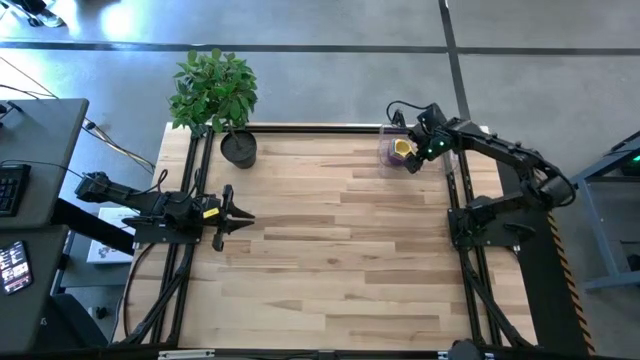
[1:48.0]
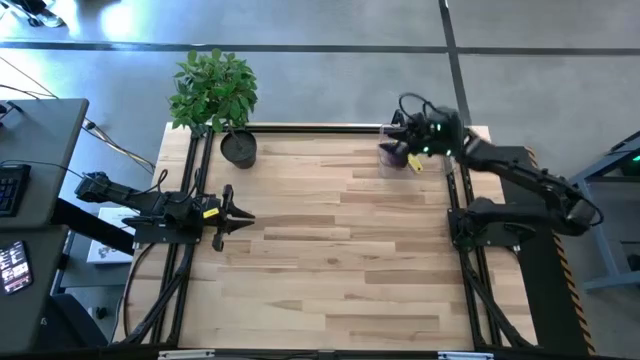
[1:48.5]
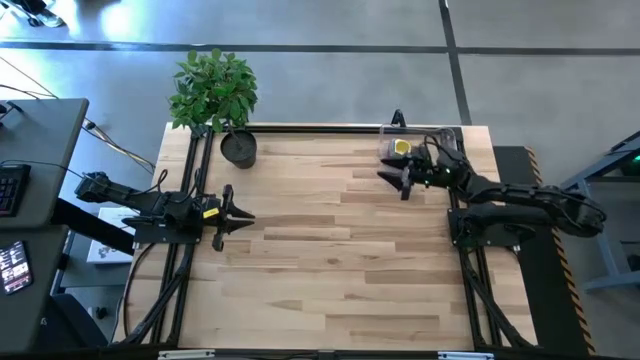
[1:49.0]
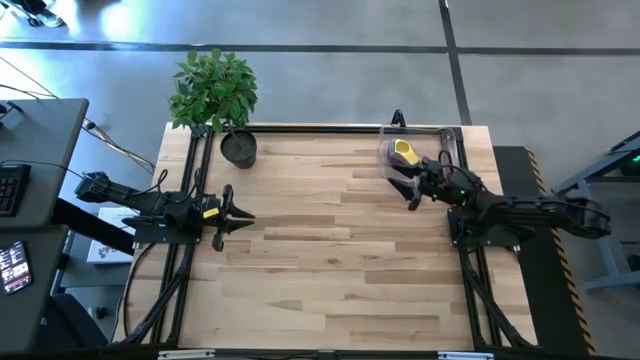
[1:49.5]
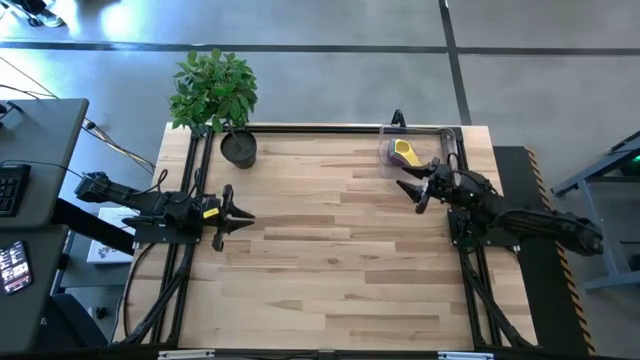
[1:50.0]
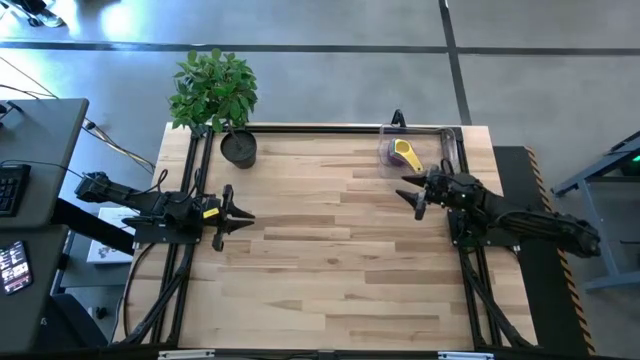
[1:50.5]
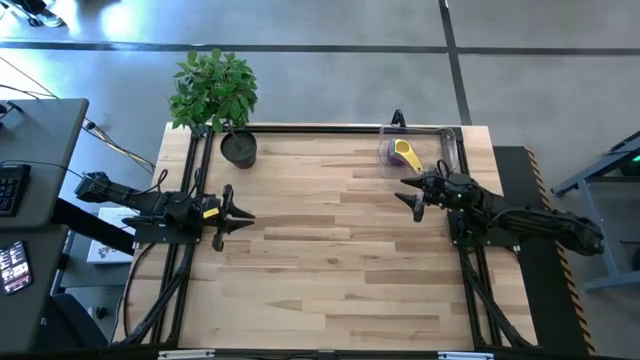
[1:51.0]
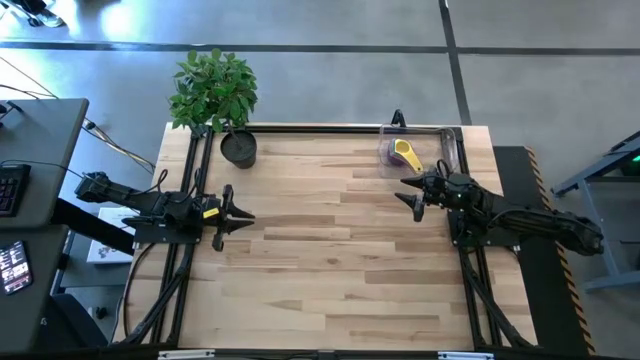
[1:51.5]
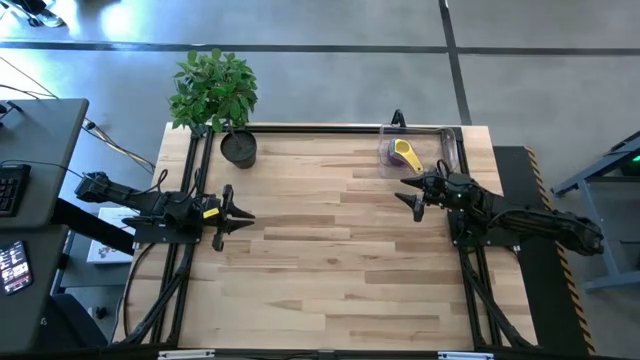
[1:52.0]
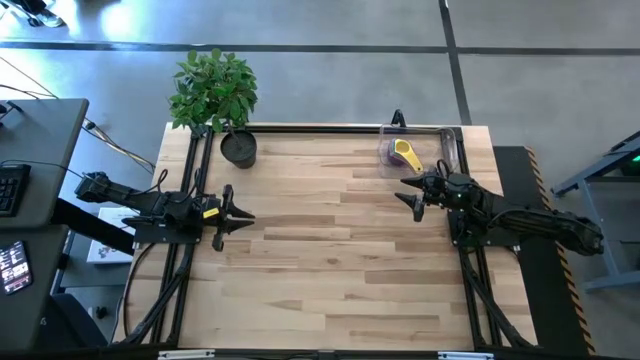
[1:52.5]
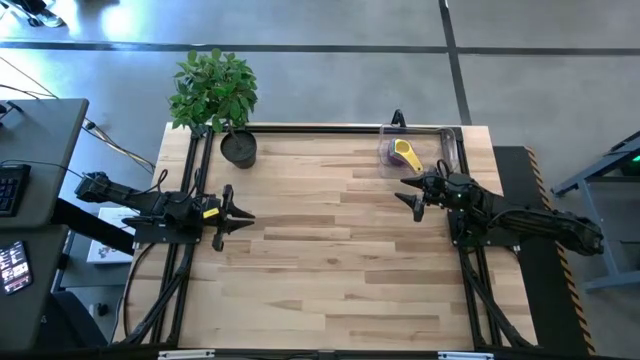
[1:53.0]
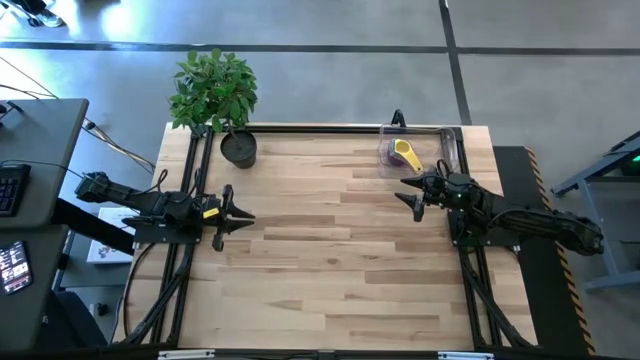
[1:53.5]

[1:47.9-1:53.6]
Task: Nest measuring cups in basket
Return to Home Position

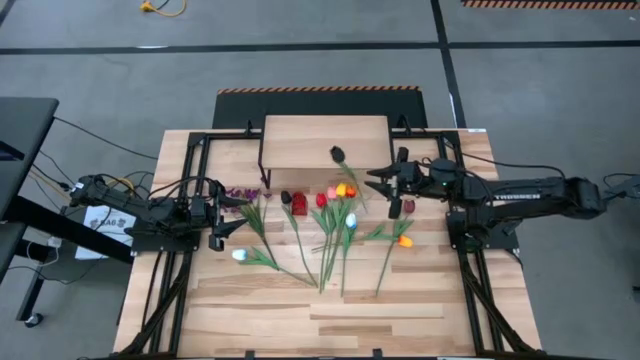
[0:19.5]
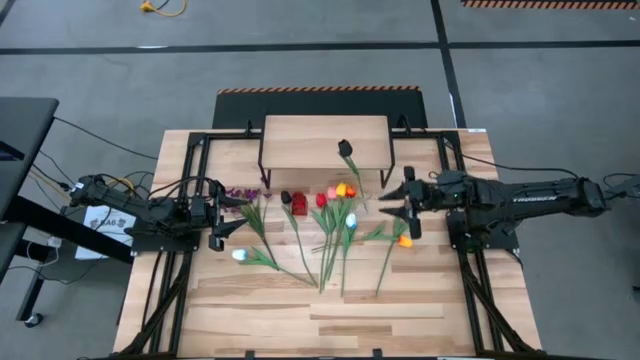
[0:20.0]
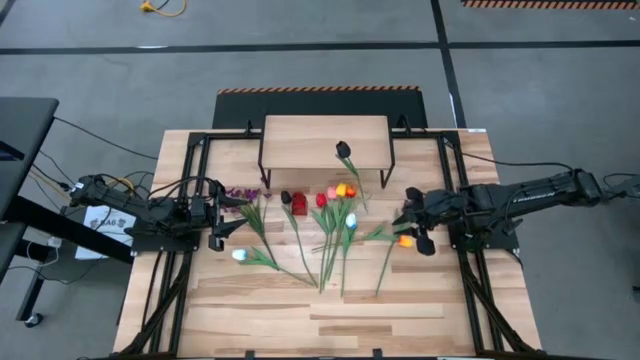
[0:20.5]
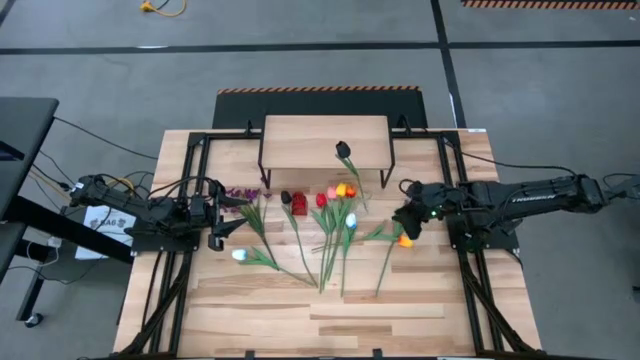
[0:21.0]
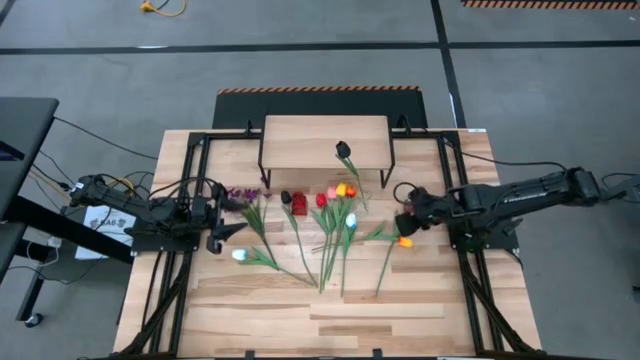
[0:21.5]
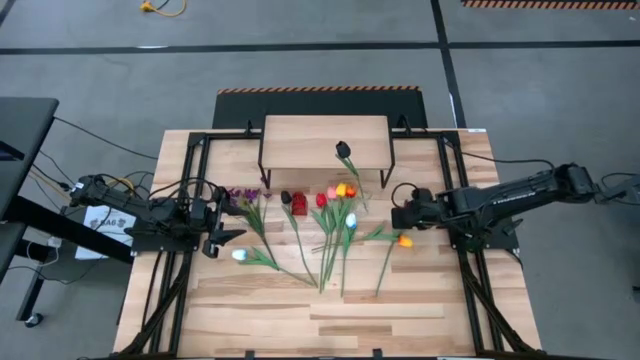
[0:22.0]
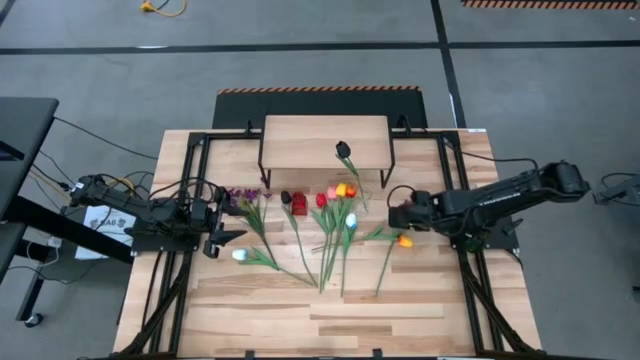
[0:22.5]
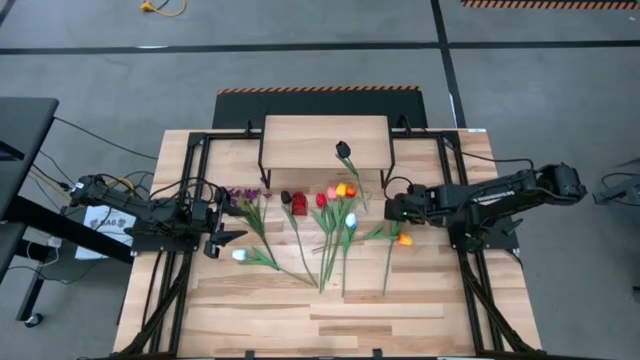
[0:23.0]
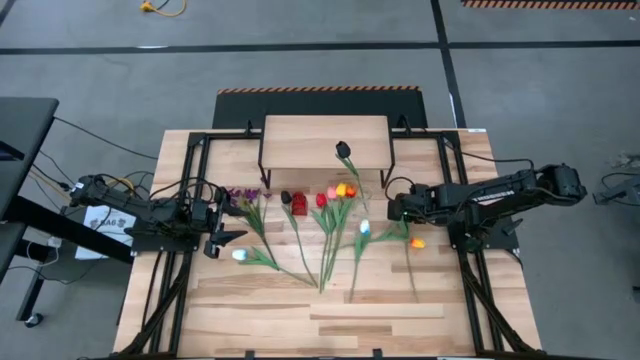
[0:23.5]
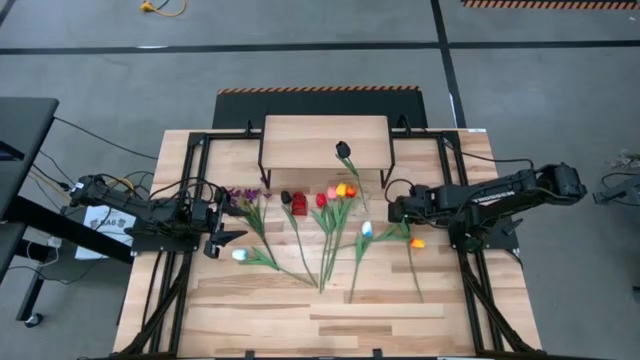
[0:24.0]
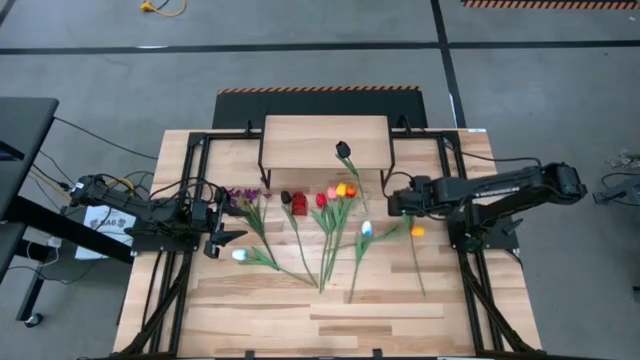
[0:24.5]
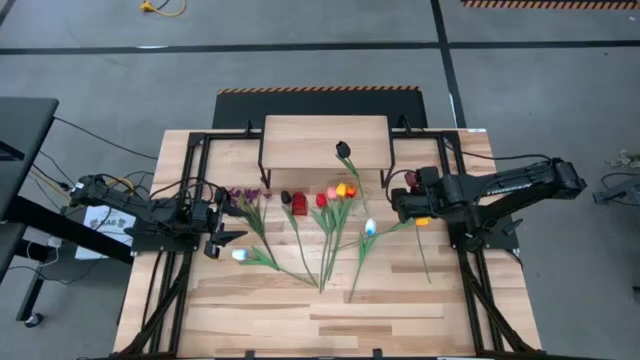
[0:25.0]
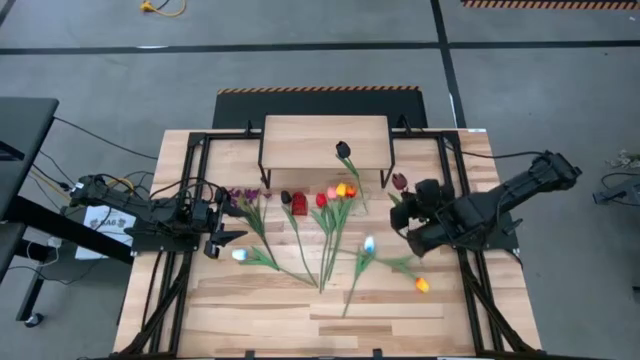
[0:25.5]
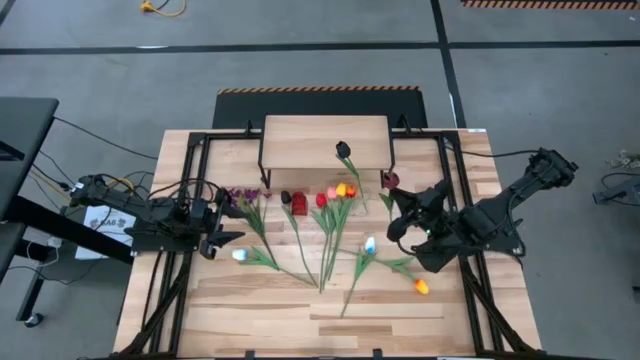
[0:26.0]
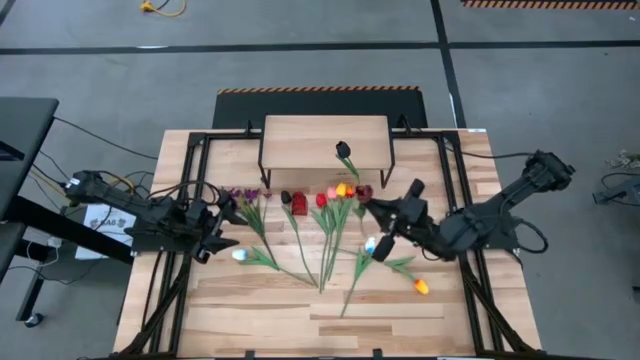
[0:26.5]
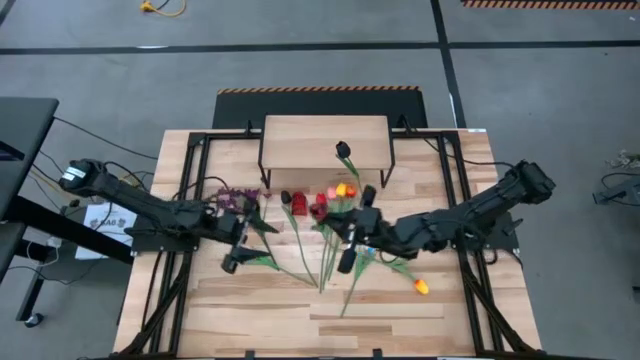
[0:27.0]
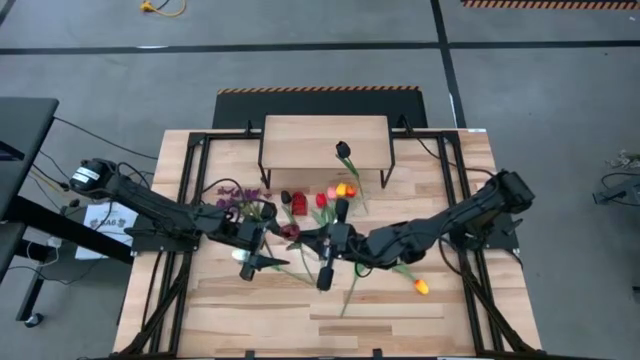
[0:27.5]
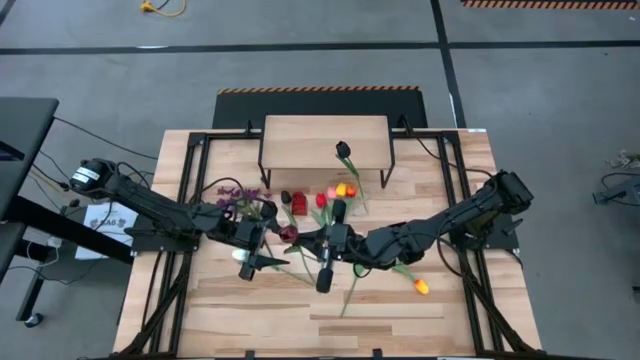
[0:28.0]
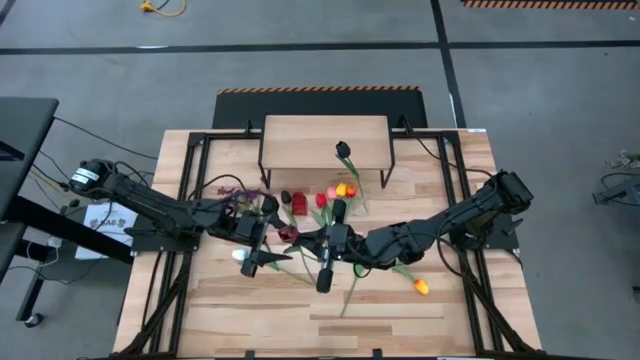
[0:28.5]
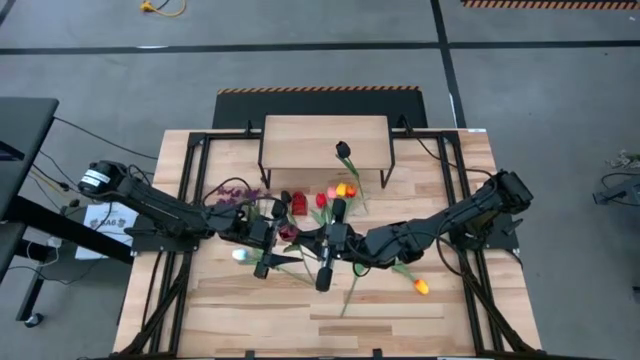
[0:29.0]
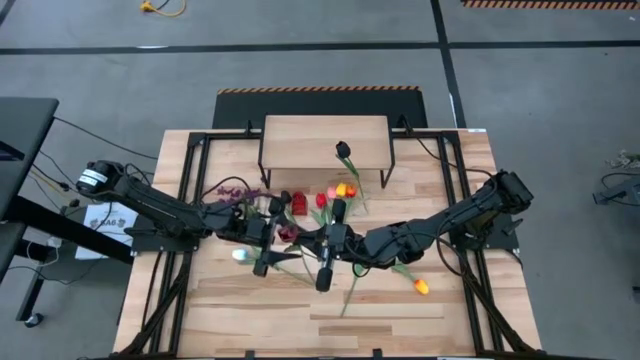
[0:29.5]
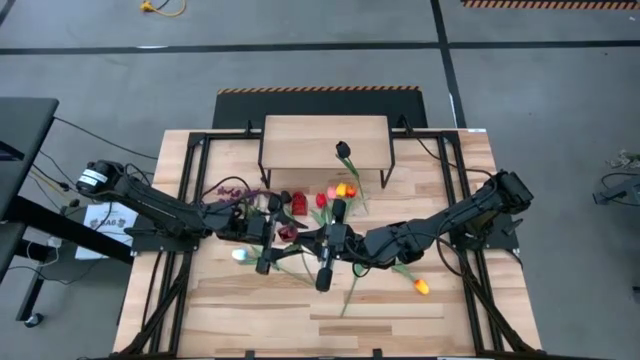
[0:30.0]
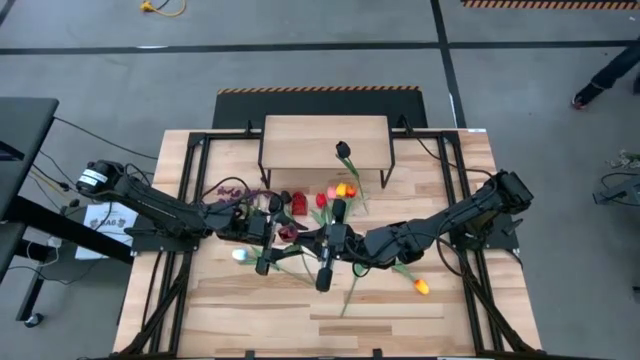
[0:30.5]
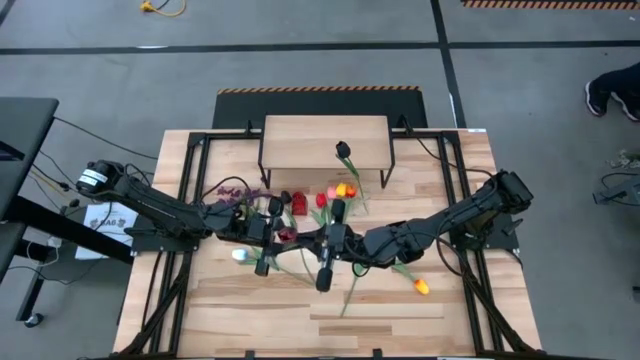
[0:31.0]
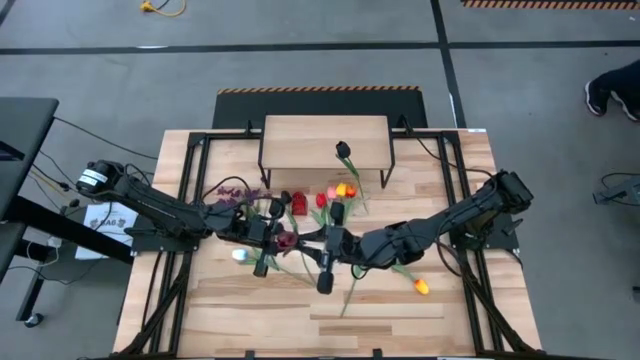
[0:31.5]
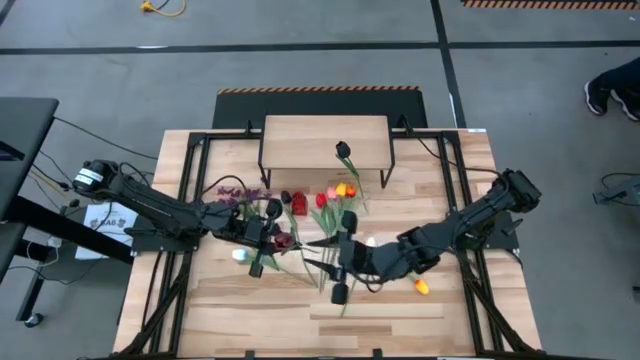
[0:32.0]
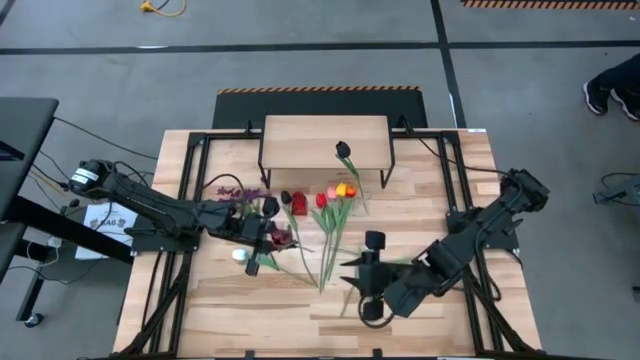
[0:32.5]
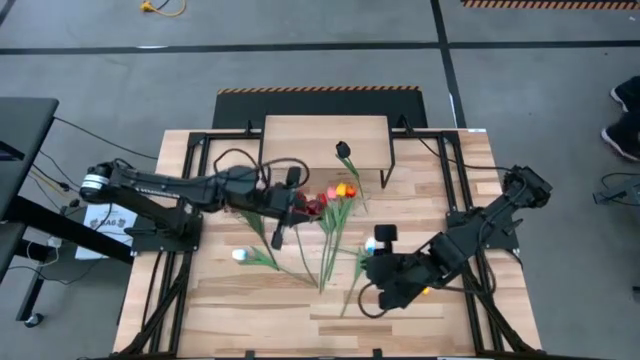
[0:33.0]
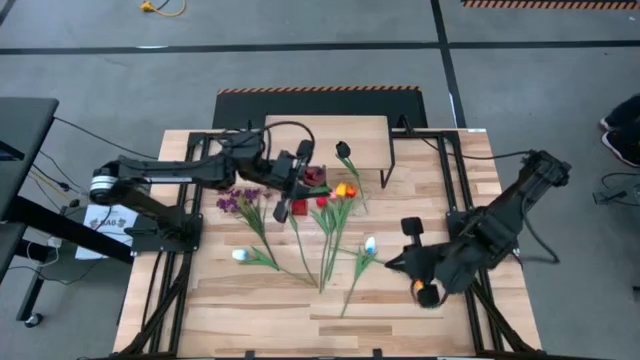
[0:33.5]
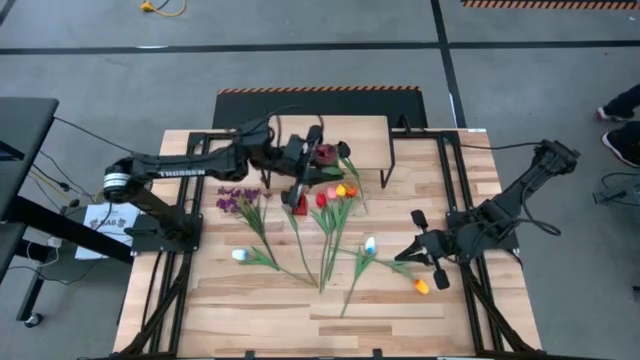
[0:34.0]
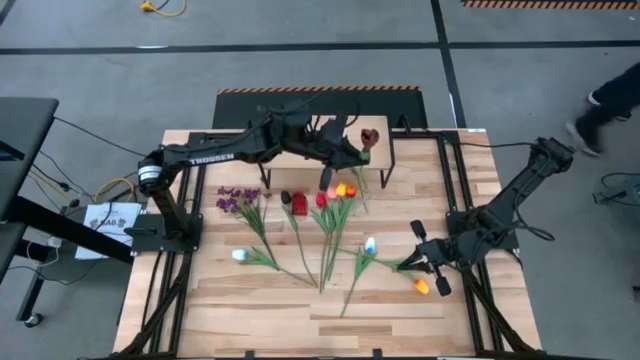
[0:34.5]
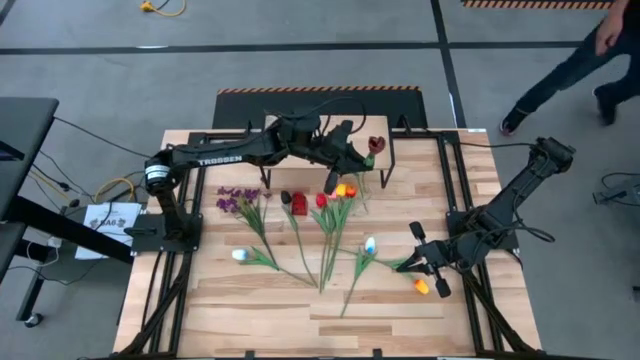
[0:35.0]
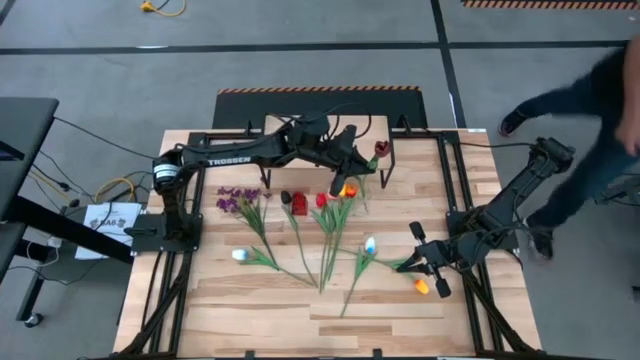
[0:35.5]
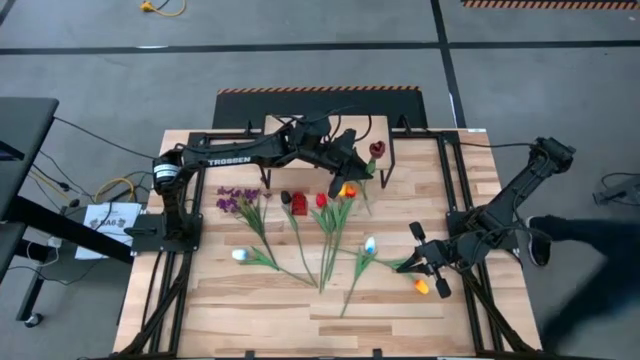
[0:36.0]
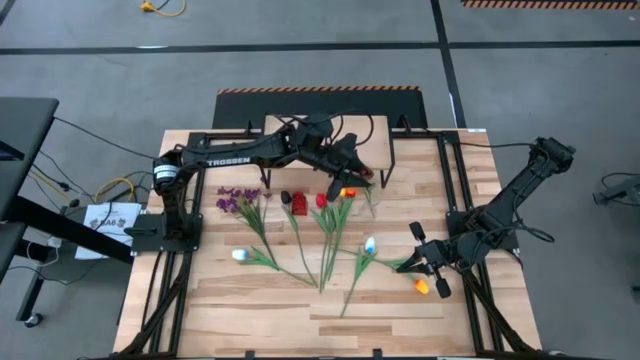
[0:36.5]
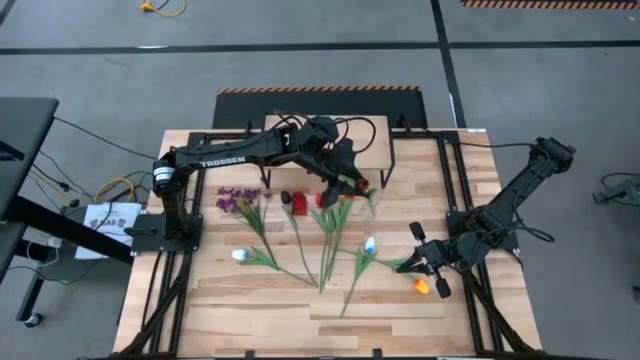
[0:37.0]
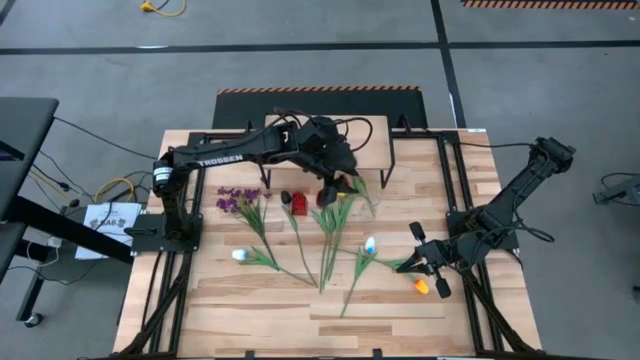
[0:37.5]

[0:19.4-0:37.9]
Task: Pick and place flowers into a vace then onto a shelf
Put the dark red flower into the transparent vase
